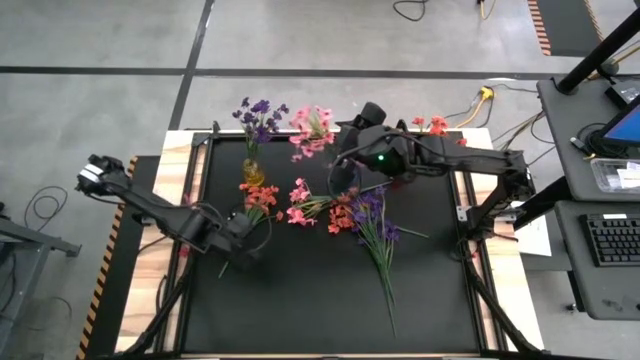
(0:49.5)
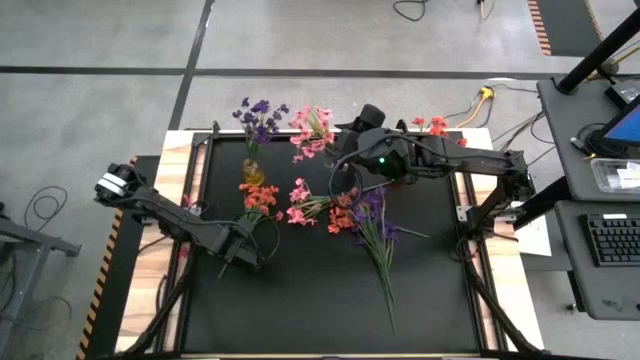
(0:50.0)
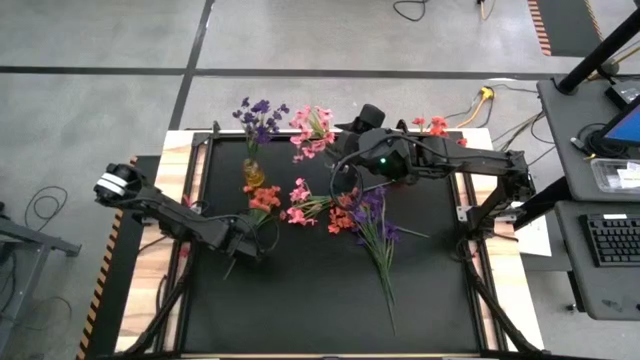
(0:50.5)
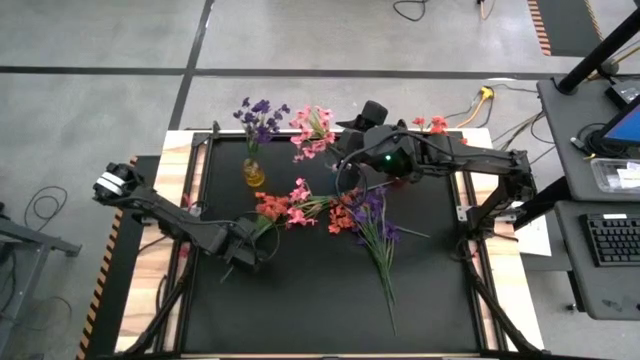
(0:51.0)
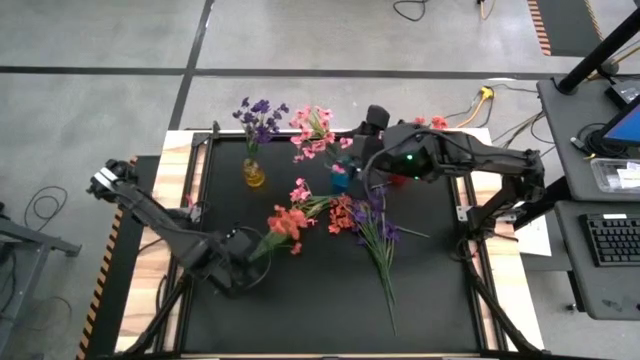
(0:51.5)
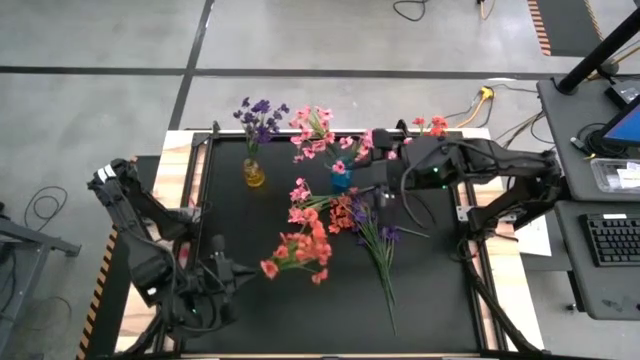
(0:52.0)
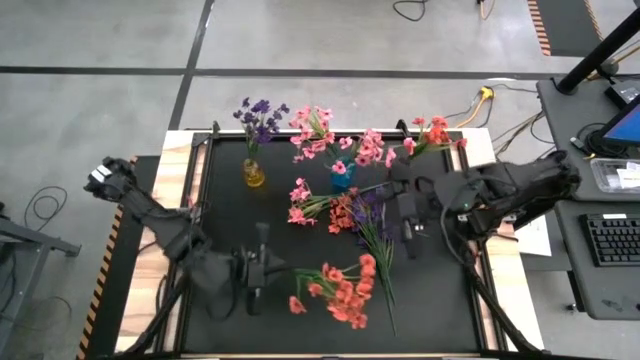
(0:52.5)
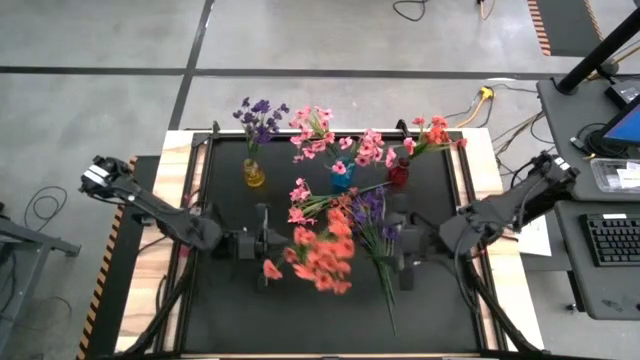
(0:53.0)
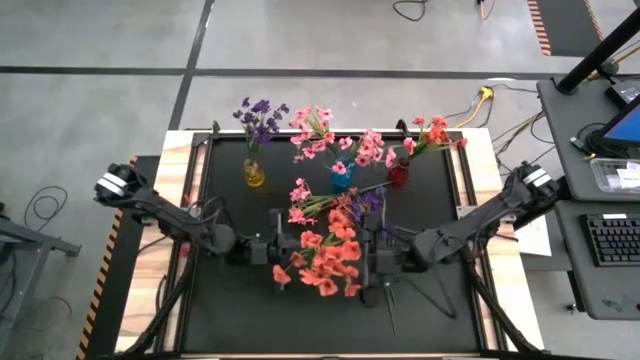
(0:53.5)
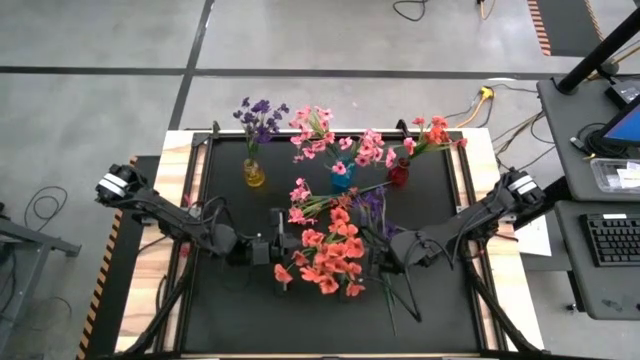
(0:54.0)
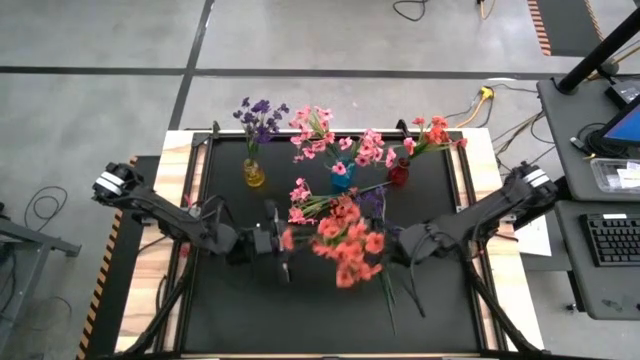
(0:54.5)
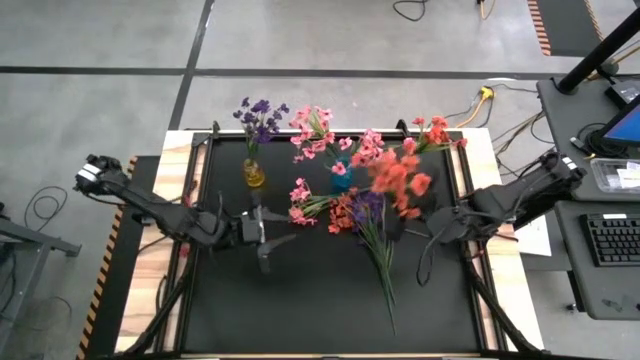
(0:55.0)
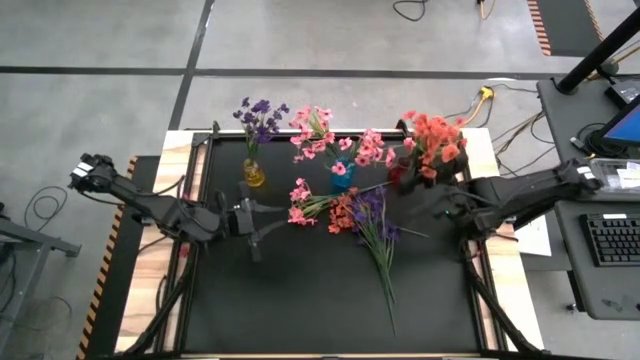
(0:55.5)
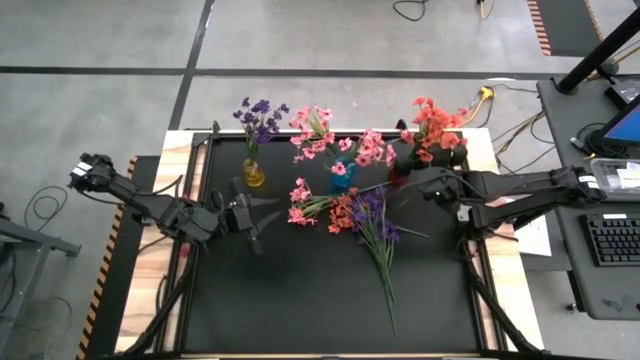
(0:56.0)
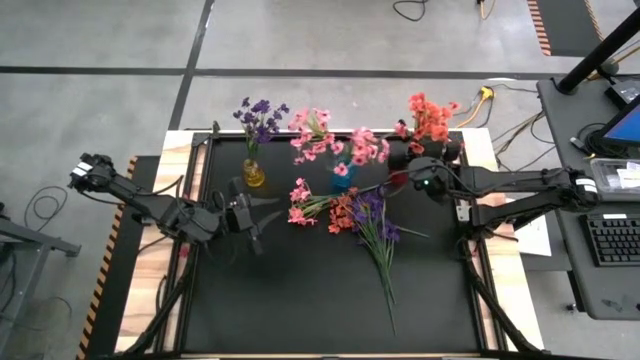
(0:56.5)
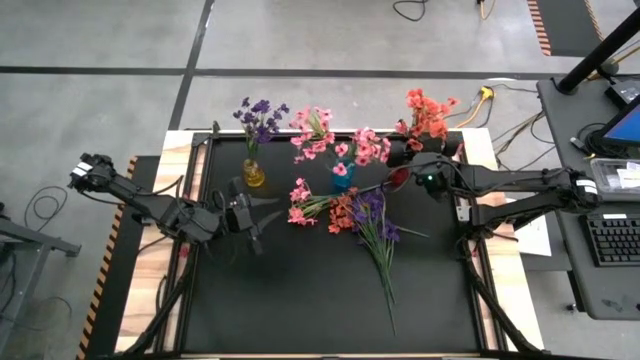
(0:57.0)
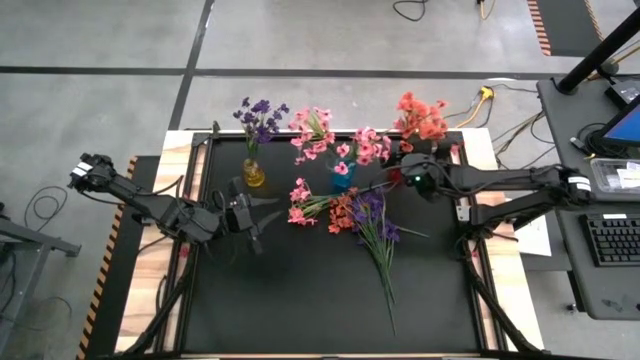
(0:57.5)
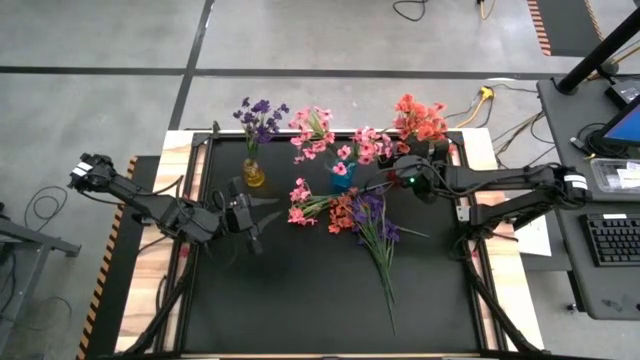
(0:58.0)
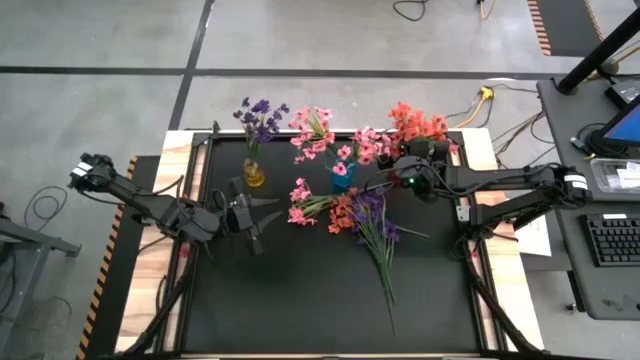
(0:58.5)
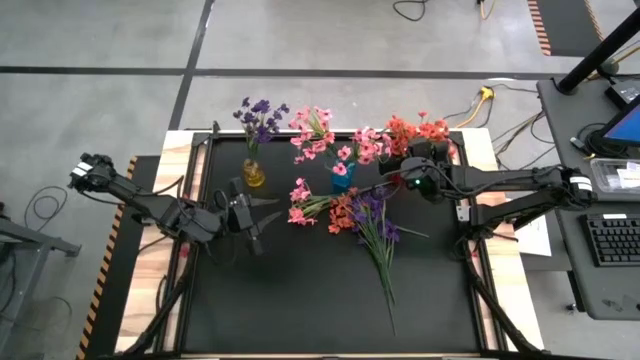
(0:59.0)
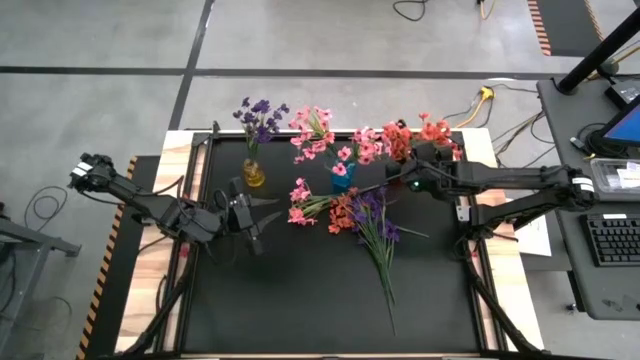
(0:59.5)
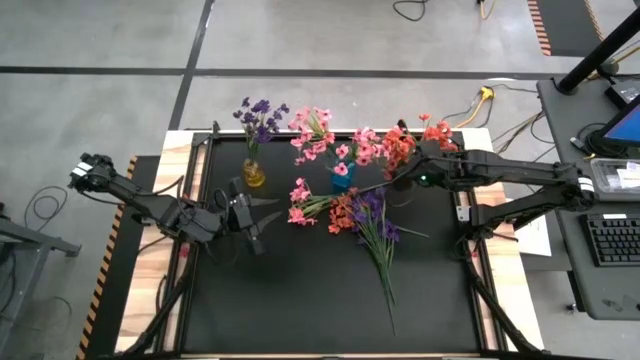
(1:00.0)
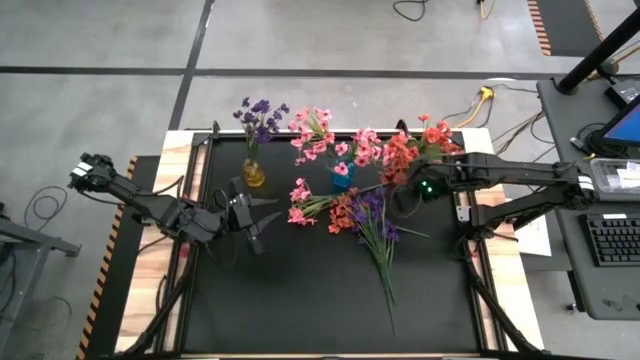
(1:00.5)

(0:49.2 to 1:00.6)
Task: Sort flowers into vase by color
Put the left orange flower into the red vase

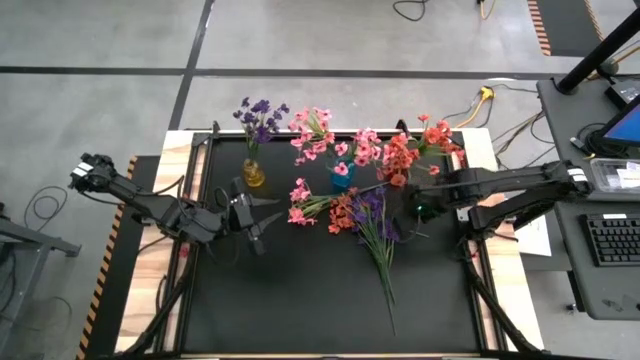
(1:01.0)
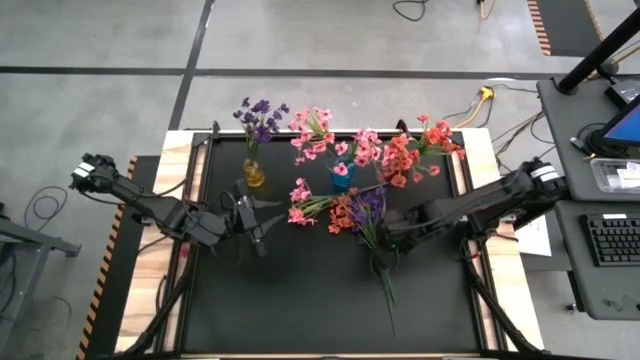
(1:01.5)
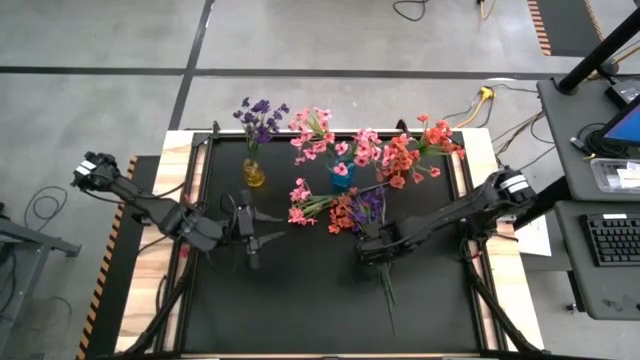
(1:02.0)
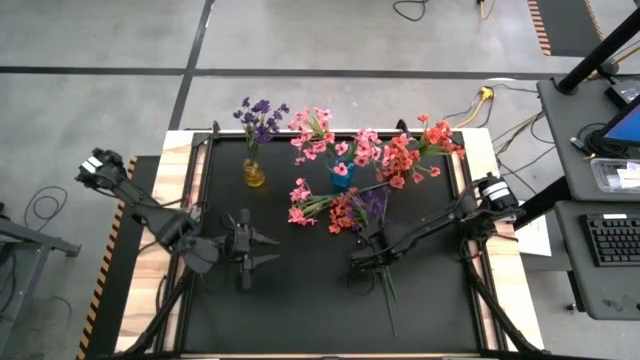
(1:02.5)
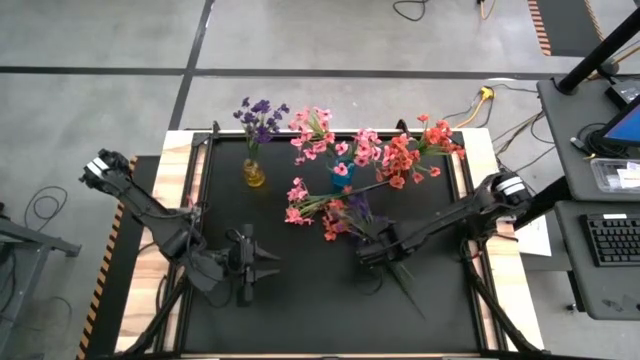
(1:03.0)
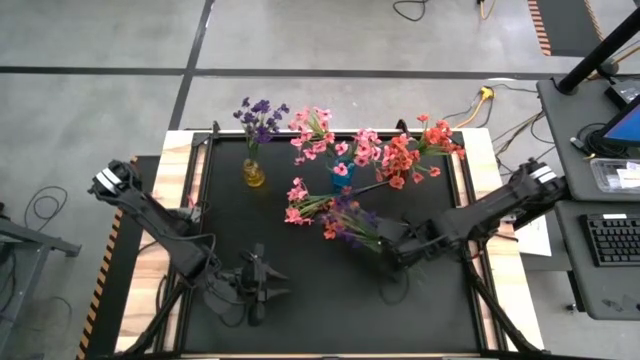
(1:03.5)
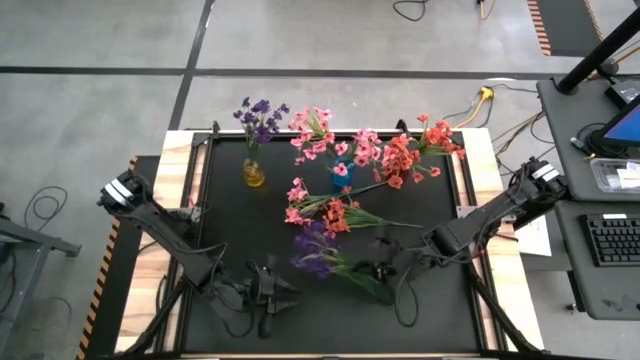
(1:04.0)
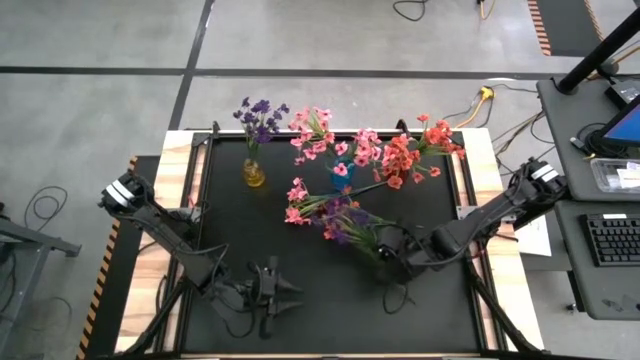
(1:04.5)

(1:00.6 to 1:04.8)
Put the purple flower into the yellow vase

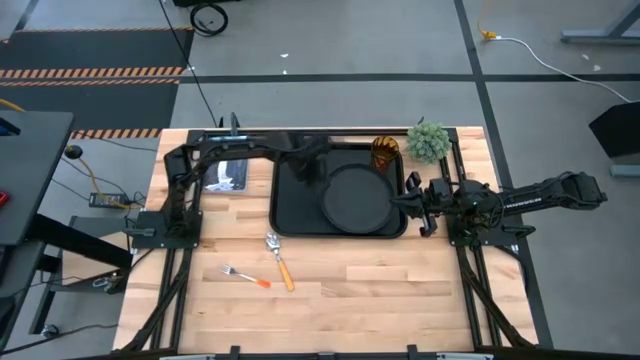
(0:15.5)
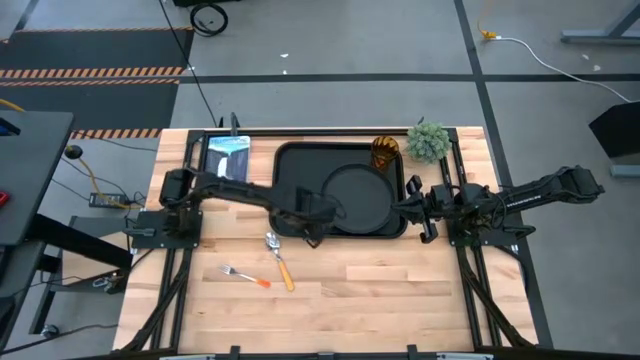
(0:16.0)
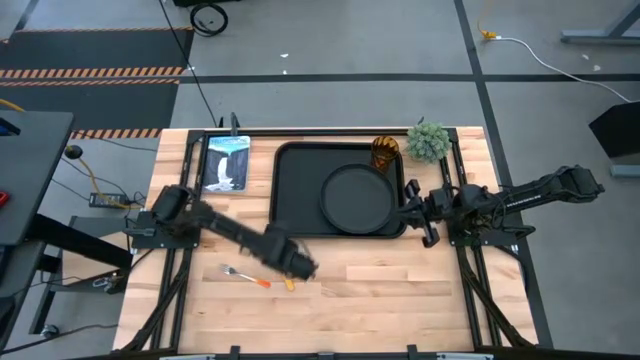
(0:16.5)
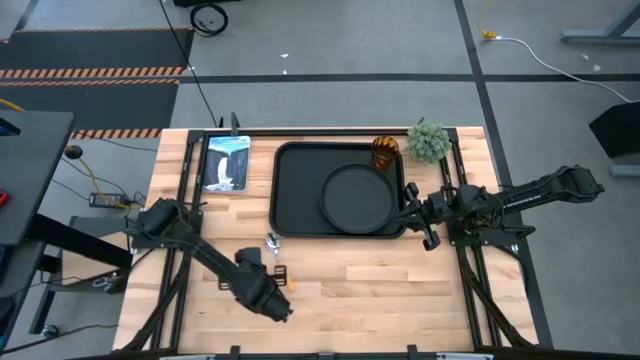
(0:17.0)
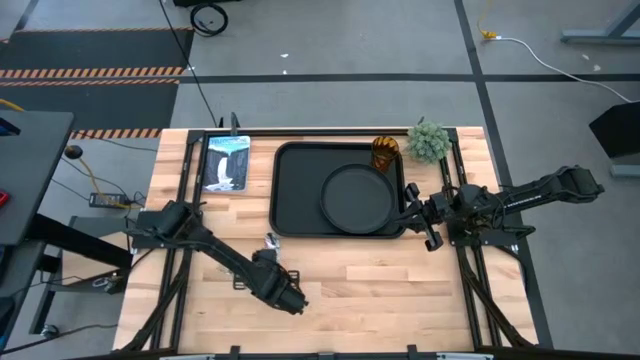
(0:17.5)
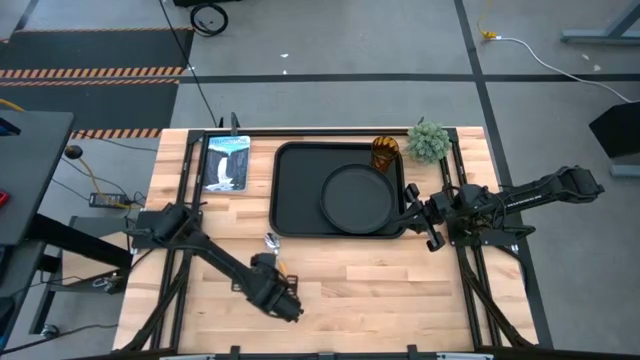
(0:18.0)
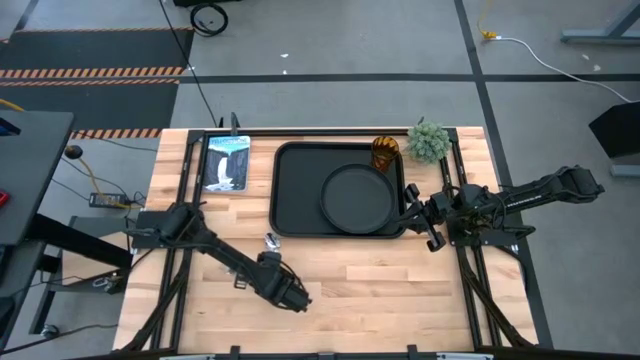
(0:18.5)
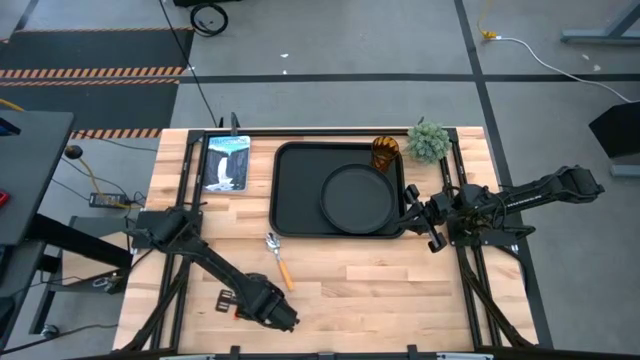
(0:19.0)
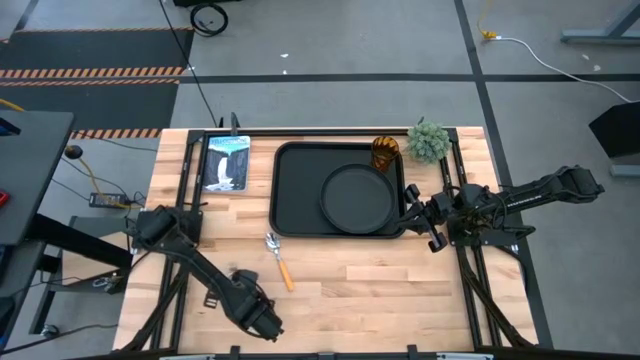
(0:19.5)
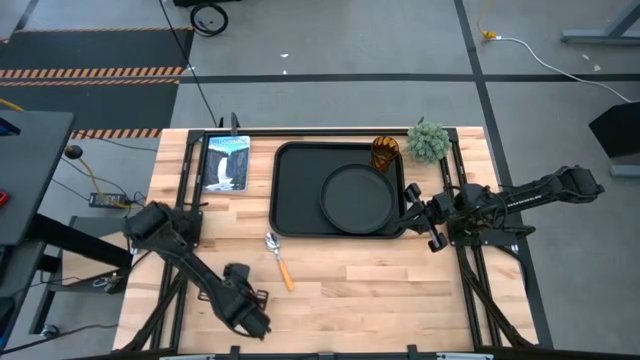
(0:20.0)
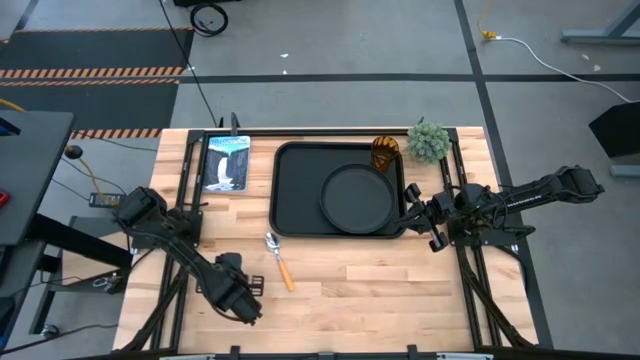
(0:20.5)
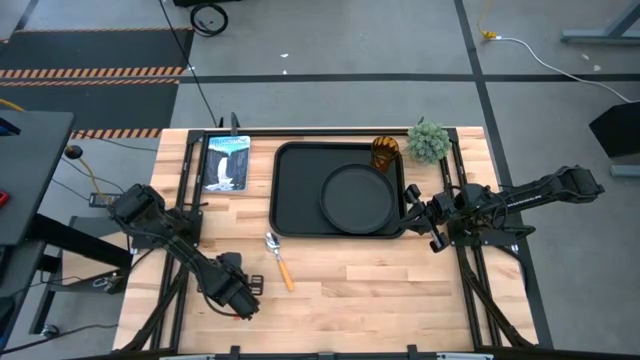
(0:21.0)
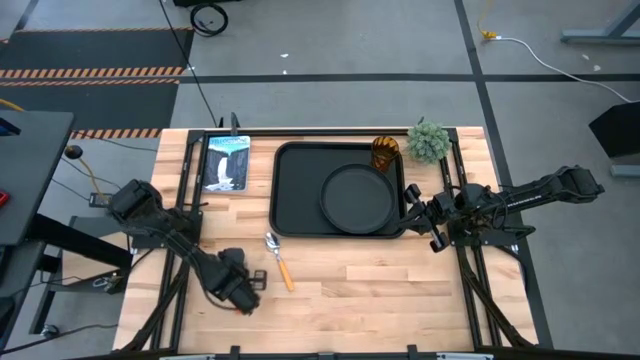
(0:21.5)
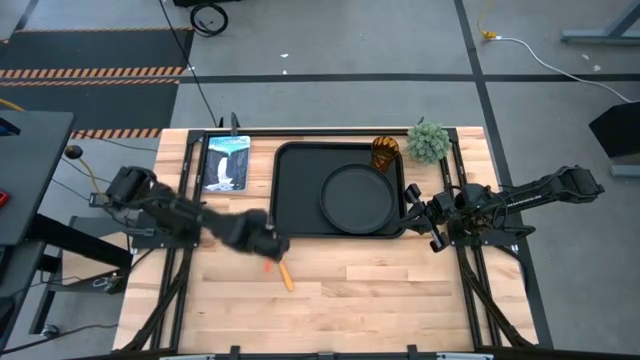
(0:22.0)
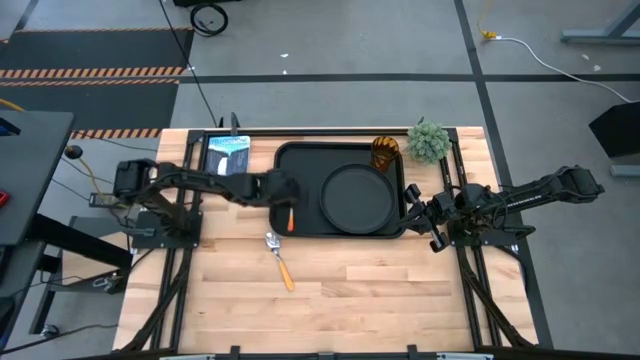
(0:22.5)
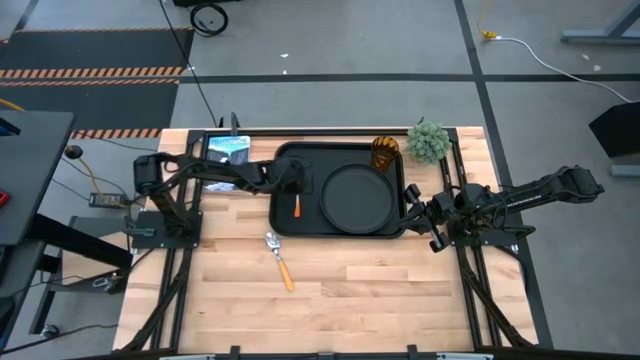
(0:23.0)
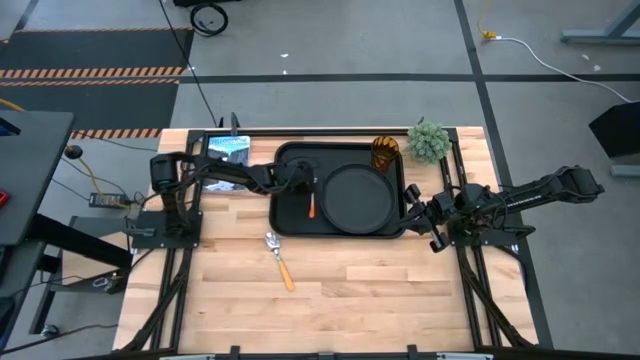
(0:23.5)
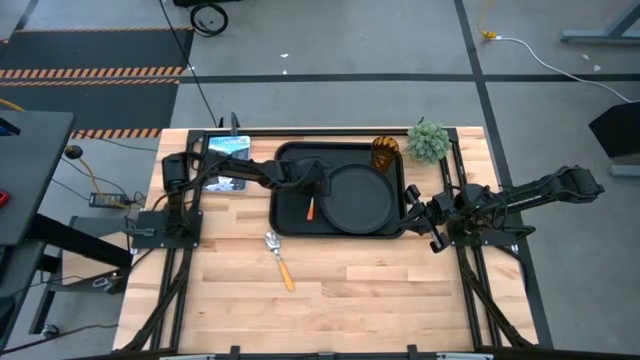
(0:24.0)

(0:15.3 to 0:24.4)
Task: Pick and place plate/cup/fork/spoon on tray
Put the orange fork on the black tray to the left of the black plate
